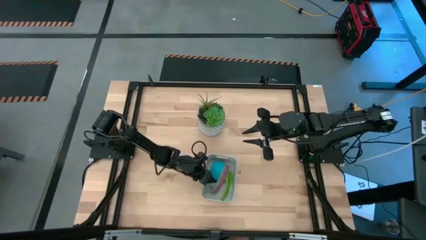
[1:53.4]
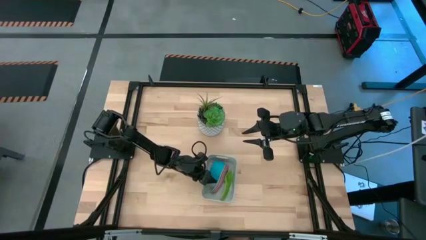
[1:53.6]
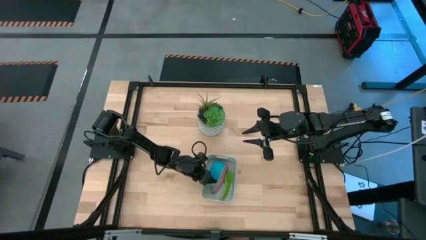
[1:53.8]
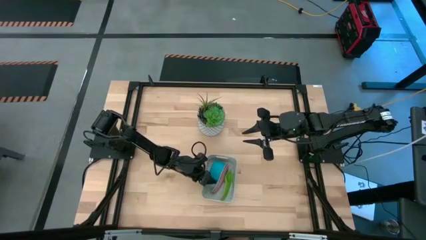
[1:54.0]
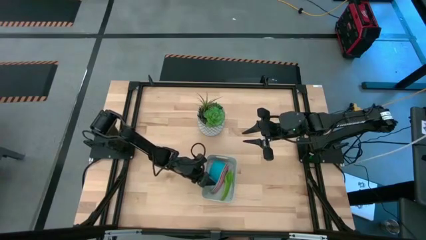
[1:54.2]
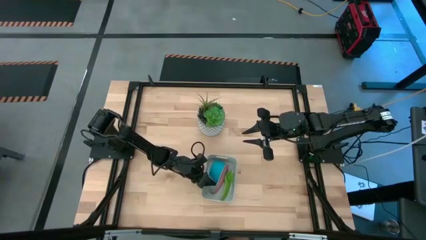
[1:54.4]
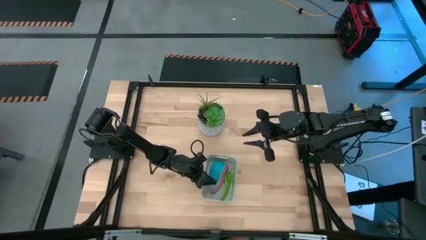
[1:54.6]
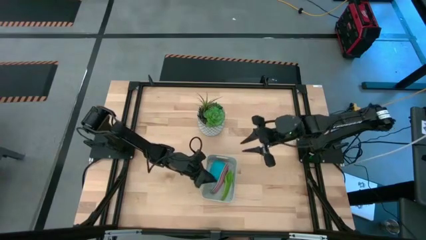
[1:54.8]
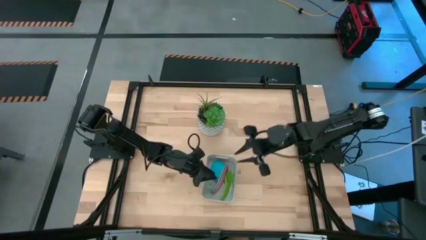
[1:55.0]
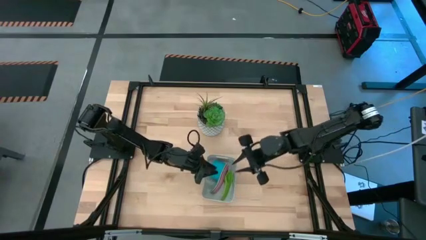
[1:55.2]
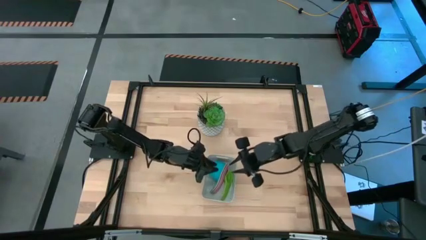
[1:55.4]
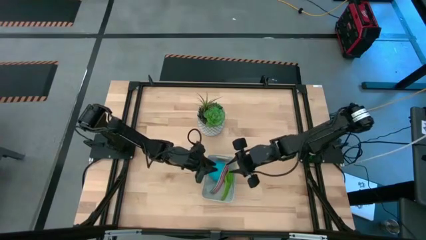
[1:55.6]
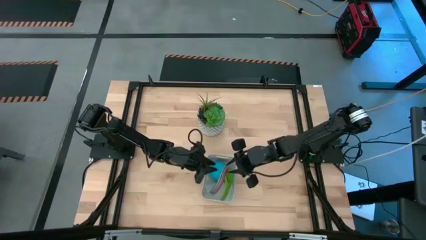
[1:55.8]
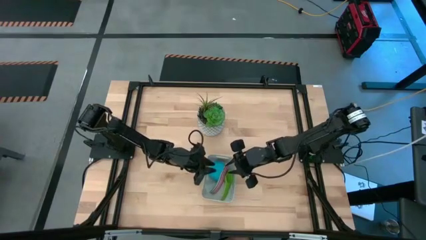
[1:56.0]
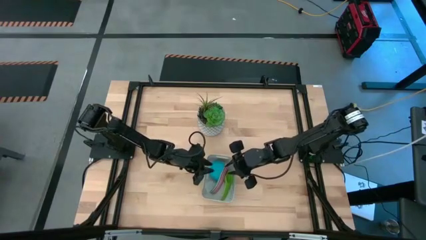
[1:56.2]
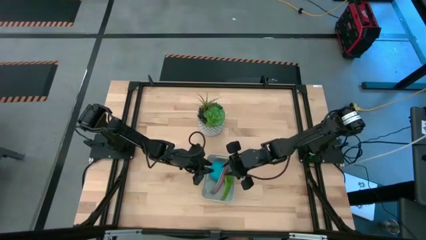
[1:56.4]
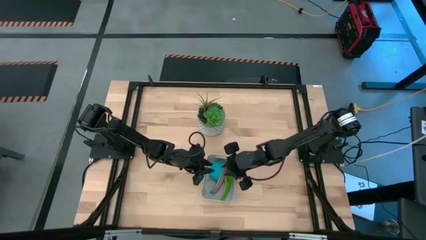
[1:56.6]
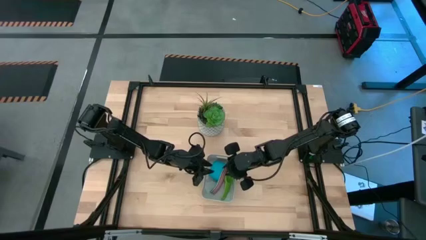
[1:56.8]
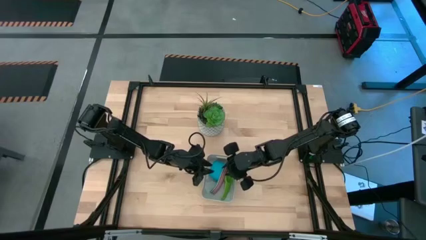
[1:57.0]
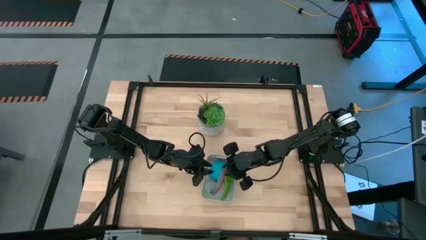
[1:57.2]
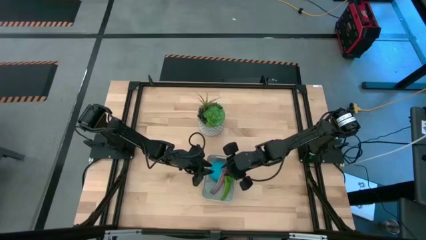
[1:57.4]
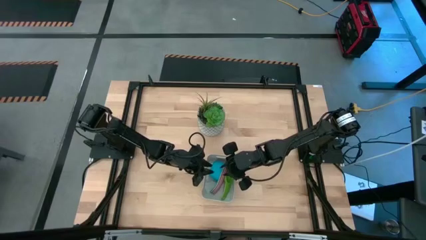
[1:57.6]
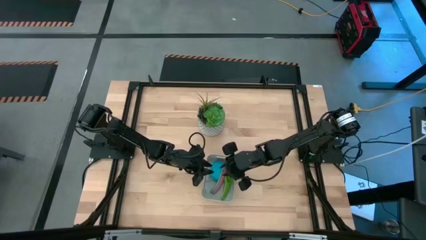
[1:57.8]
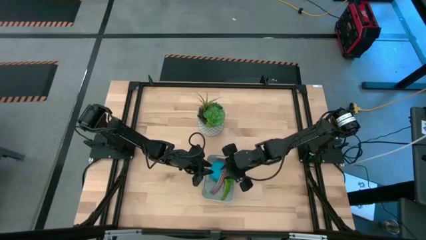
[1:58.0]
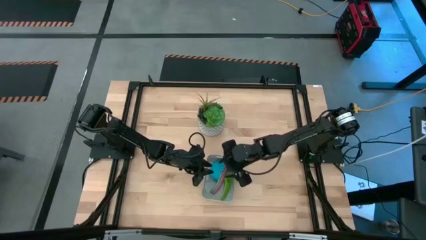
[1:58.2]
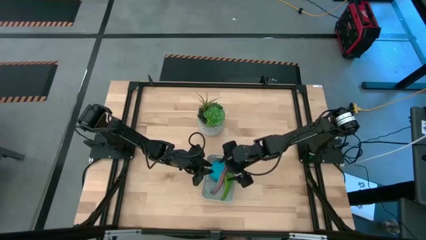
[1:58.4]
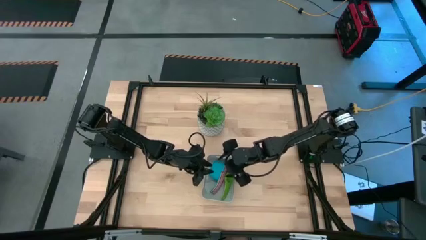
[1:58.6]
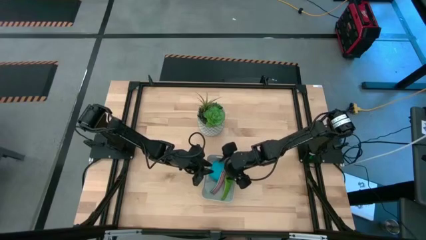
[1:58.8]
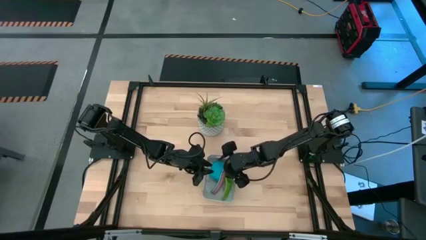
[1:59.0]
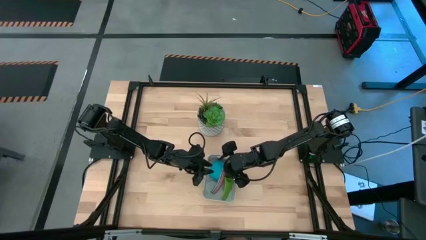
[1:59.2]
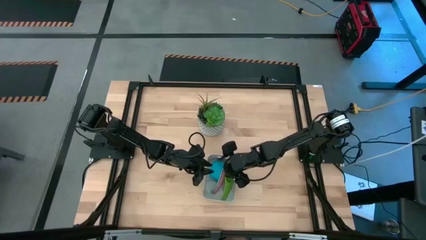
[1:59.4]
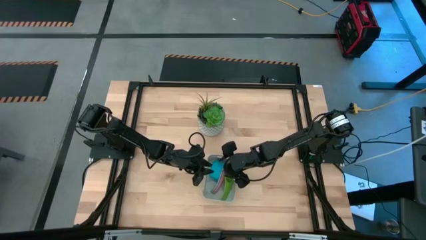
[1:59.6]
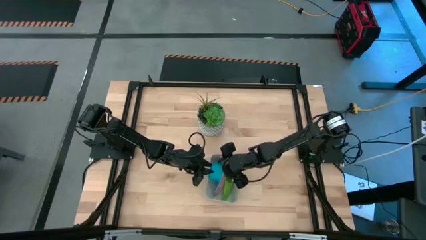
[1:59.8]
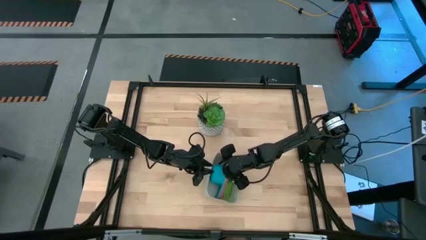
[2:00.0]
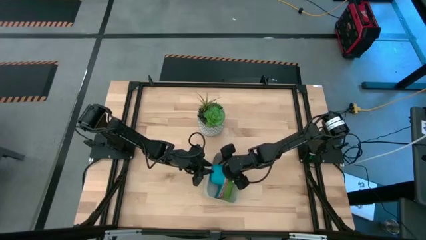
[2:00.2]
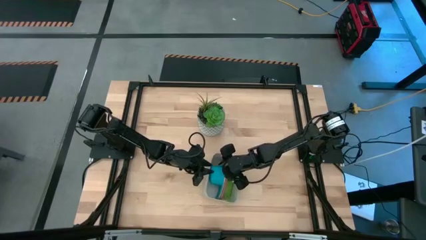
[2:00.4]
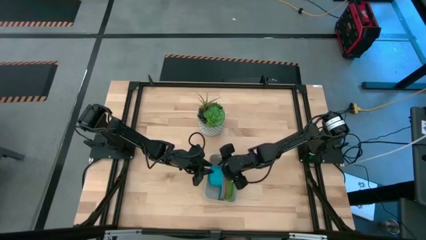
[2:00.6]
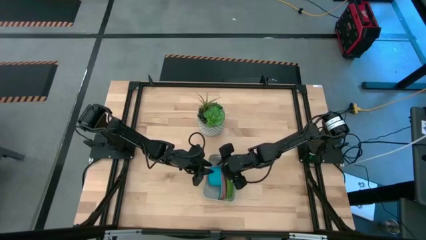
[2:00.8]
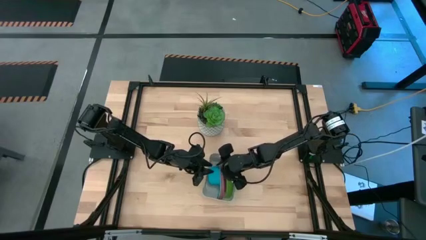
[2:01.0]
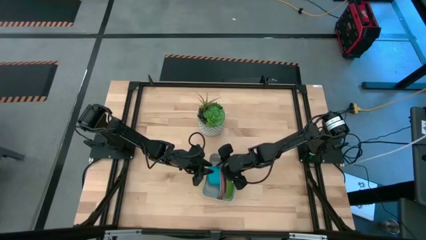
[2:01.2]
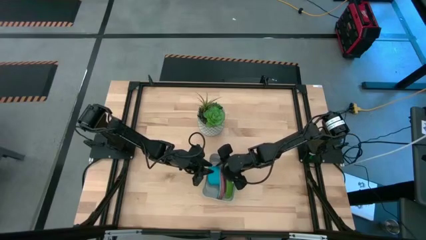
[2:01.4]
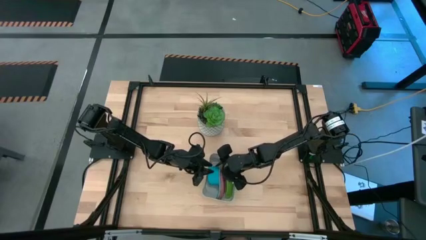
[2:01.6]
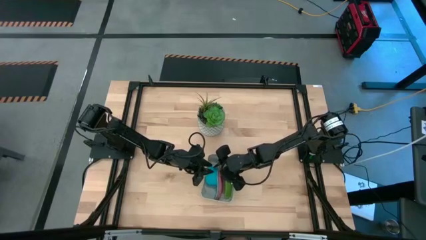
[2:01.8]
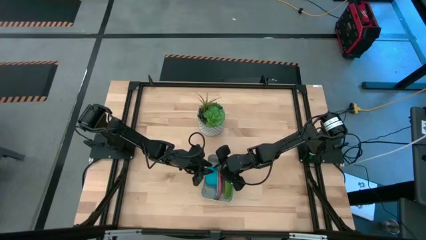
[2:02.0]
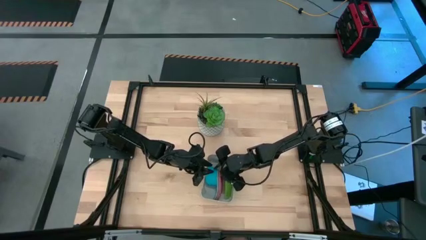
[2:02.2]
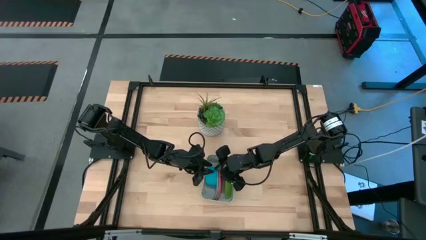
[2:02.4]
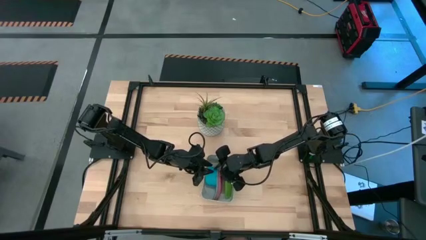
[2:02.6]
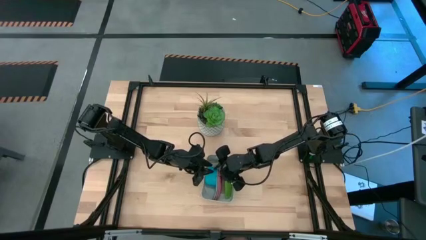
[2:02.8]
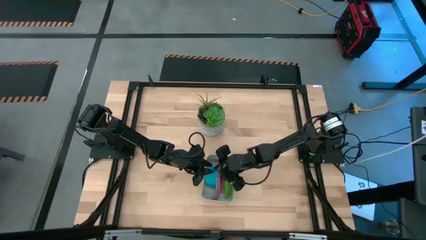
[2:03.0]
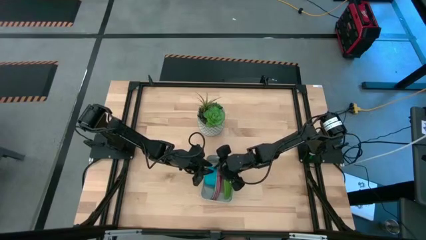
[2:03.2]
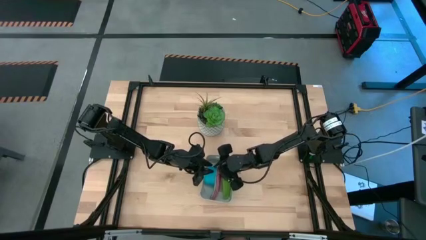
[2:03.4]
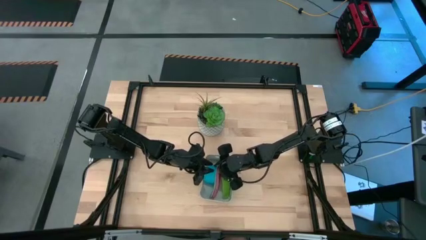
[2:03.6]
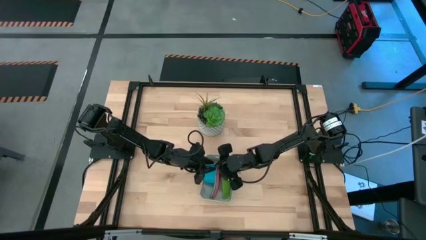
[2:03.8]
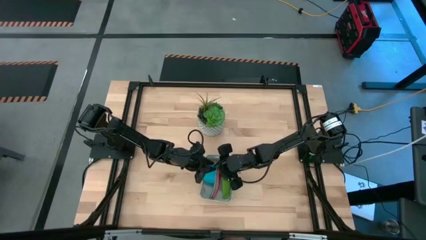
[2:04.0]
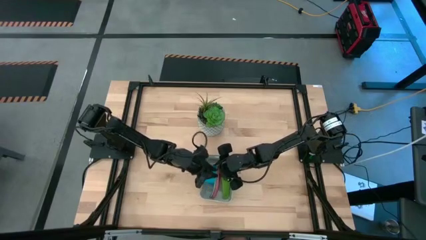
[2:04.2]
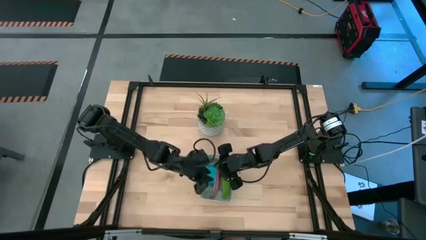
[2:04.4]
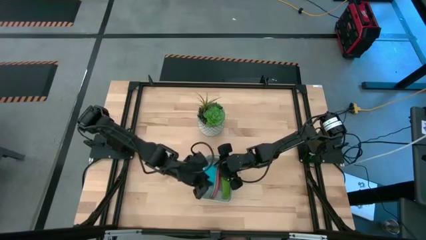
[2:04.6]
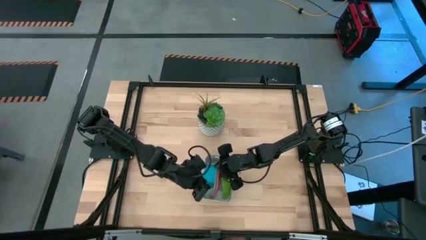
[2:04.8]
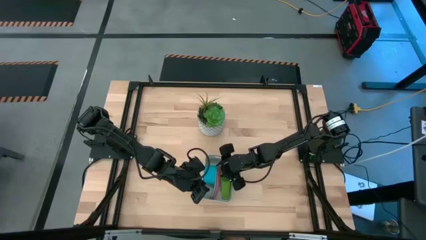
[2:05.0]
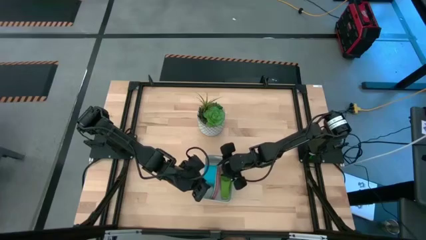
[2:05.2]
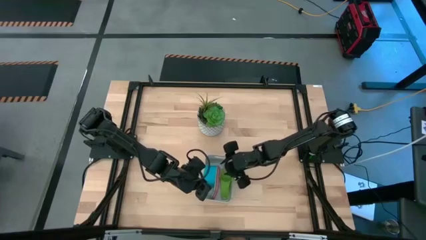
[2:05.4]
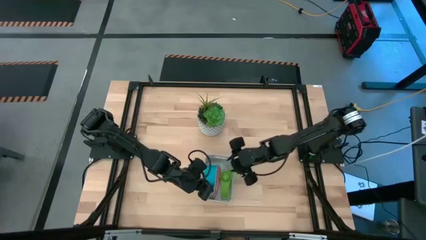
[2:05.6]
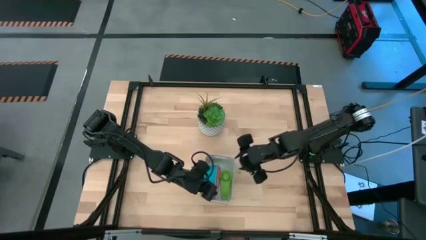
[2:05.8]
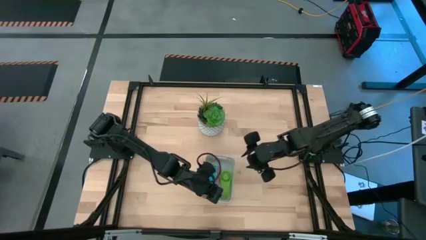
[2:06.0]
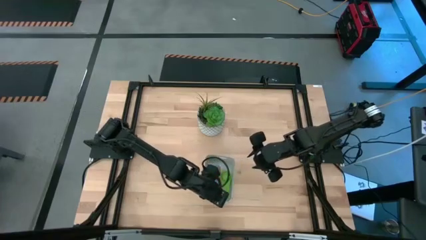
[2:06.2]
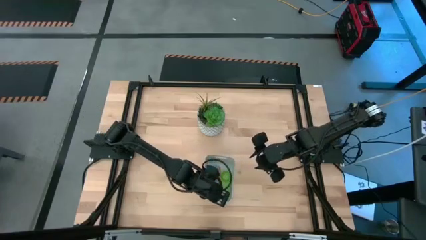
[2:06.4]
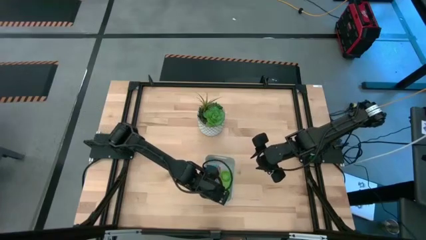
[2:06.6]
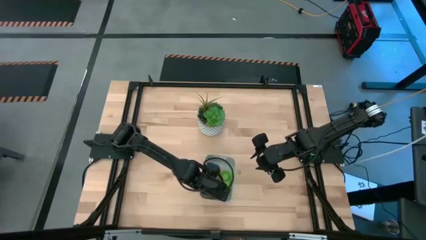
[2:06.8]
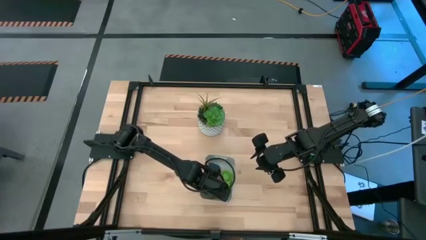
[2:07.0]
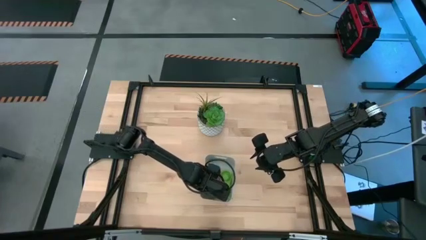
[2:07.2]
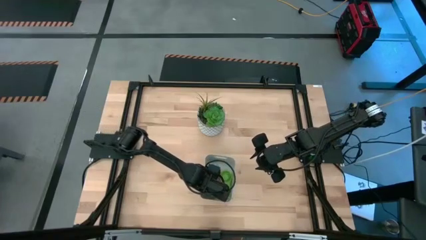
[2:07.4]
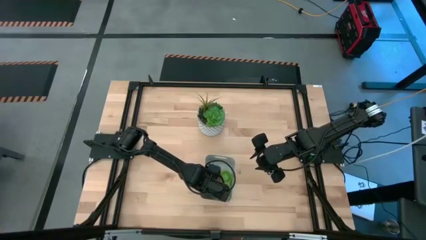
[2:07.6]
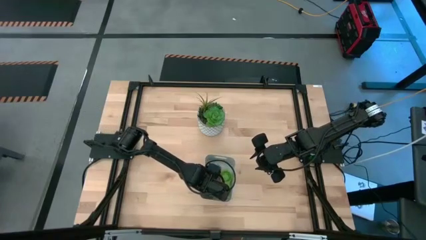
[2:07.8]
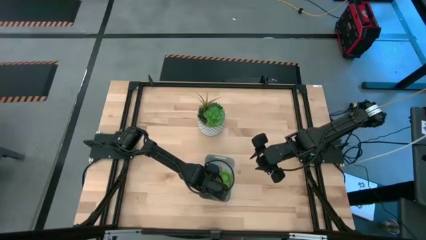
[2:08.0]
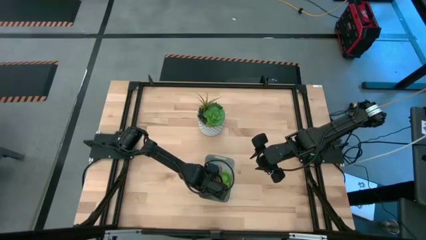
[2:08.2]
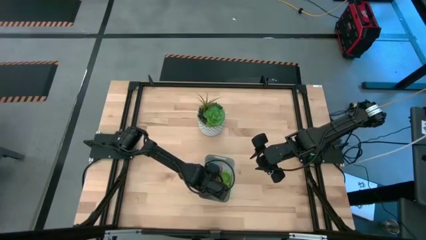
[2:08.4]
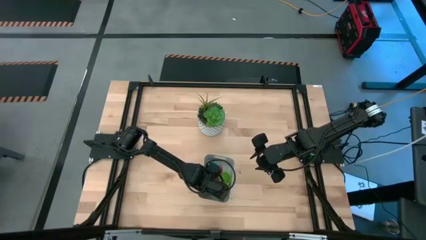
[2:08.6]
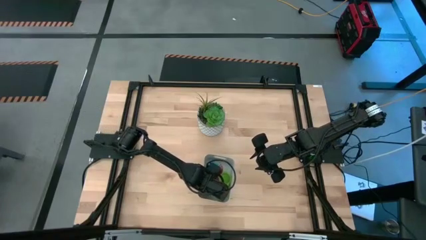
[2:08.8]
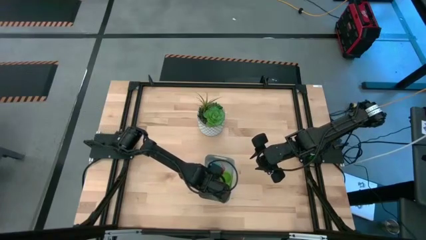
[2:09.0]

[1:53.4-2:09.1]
Task: Nest measuring cups in basket
Remove the measuring cups from the bin
